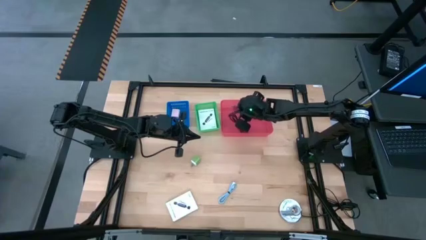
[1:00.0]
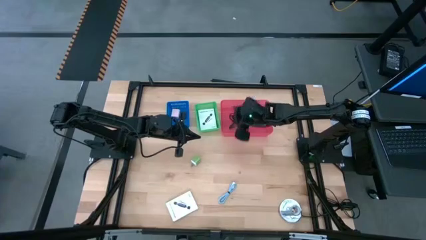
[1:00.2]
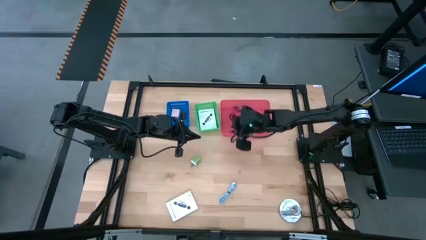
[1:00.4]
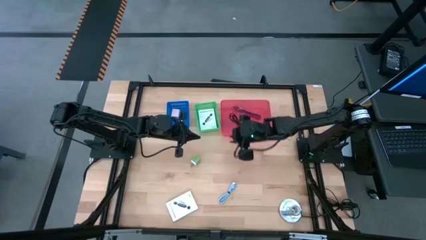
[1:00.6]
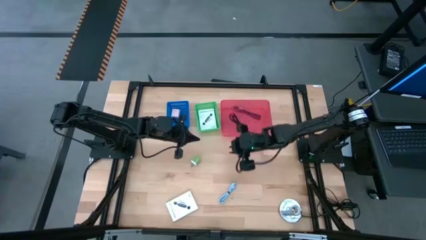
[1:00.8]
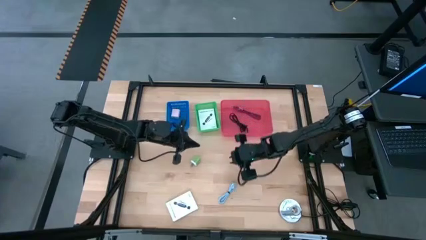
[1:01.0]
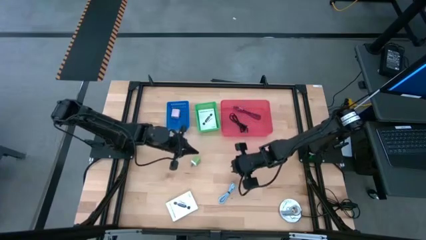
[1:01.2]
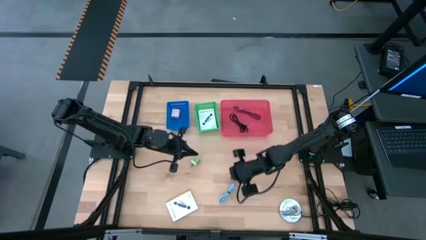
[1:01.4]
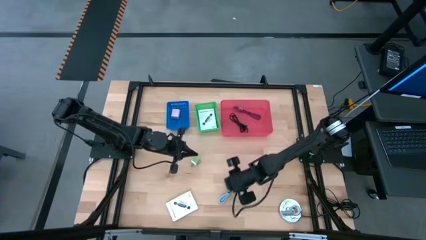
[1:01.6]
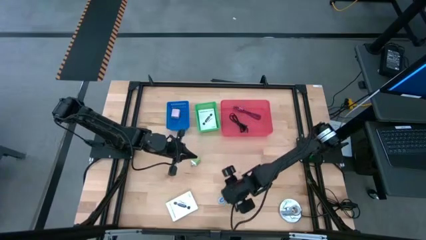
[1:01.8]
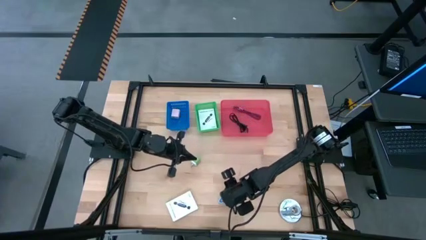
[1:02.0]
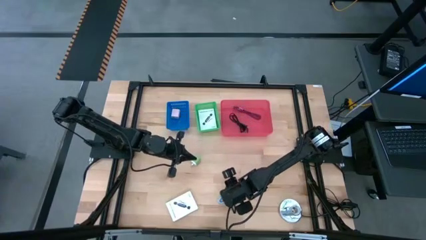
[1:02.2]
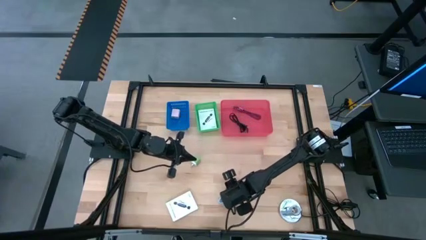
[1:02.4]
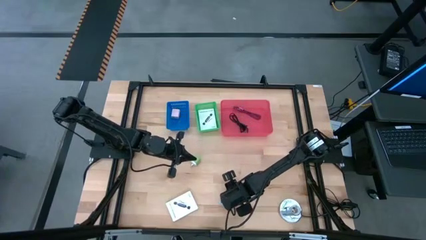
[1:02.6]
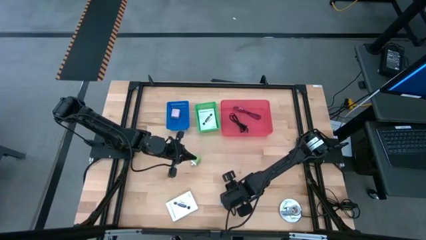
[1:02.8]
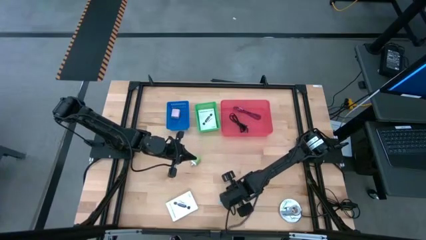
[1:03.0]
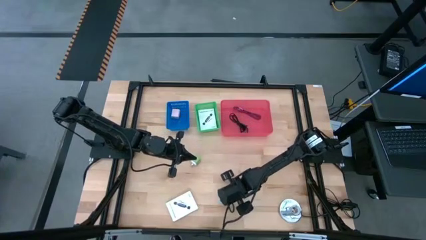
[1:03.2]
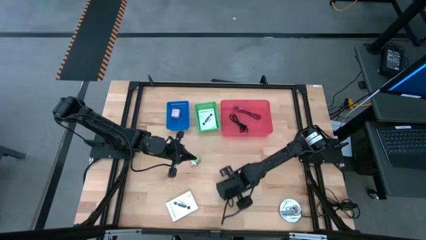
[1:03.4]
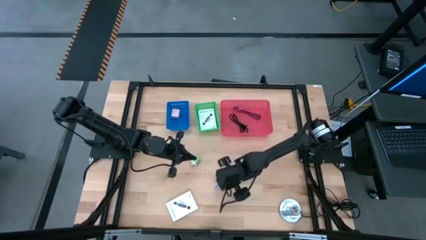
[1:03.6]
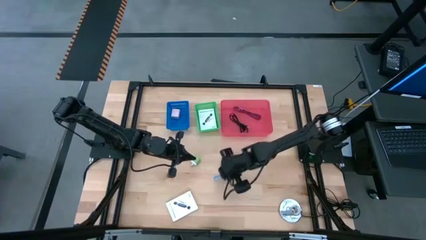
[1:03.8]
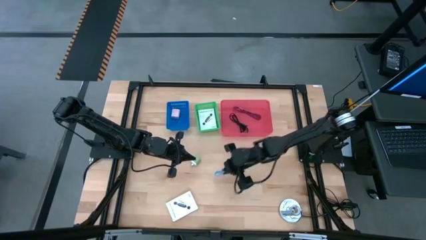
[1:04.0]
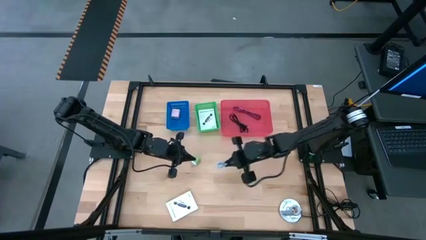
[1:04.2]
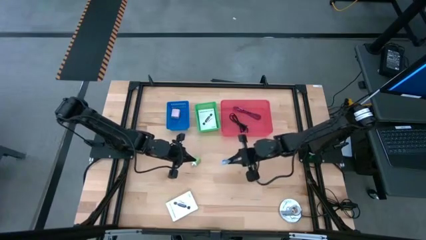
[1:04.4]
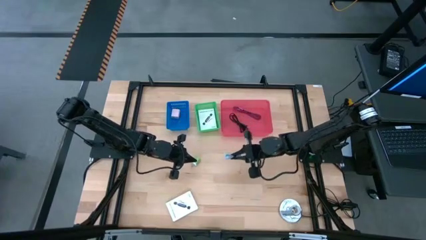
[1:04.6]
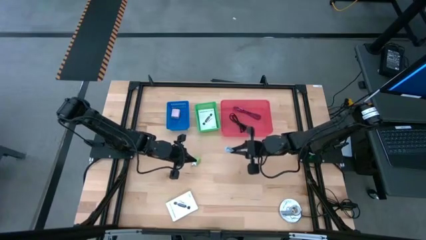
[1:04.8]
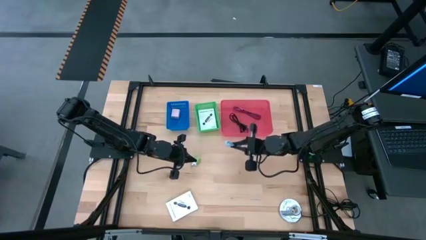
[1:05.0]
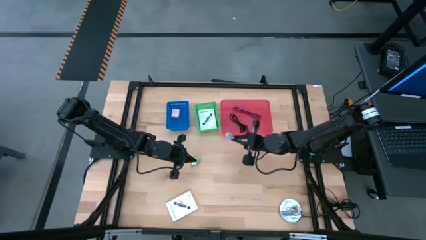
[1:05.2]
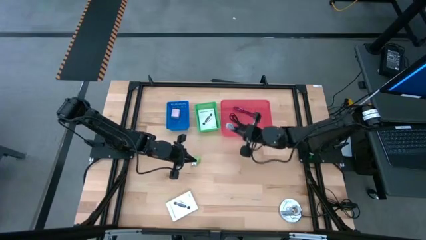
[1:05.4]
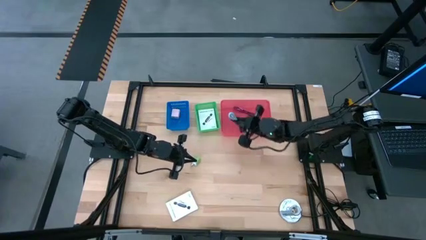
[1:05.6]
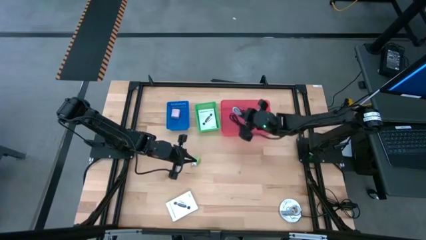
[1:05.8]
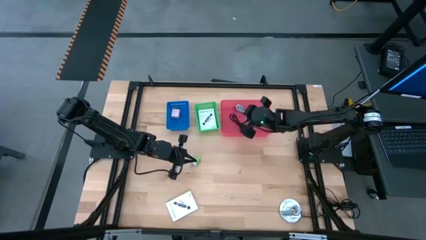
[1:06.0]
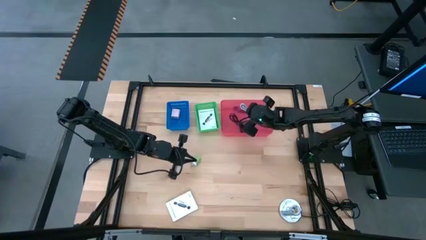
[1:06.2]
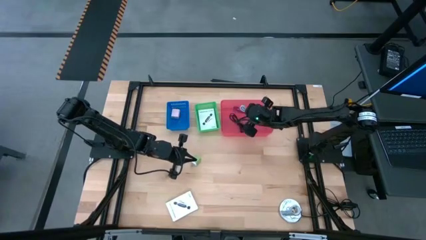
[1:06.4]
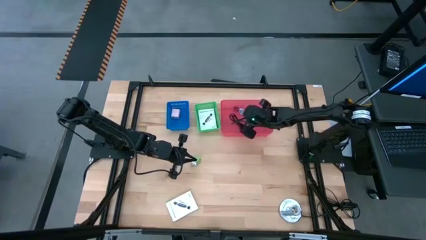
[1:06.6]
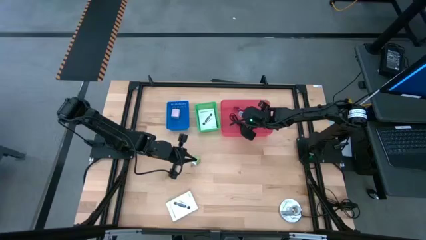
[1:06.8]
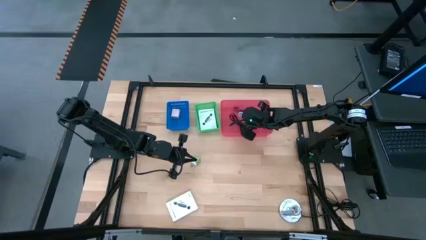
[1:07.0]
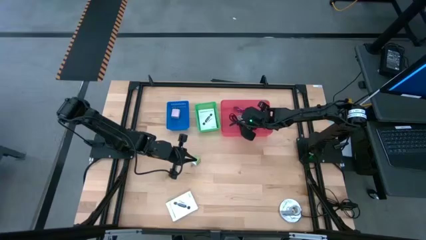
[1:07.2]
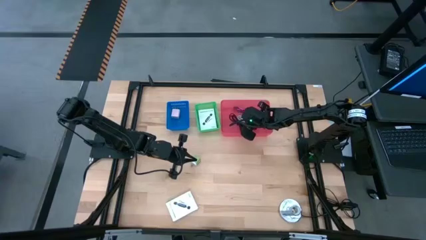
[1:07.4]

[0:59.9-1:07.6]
Task: Pick and place items into bin
Put the blue charger cable into the red bin

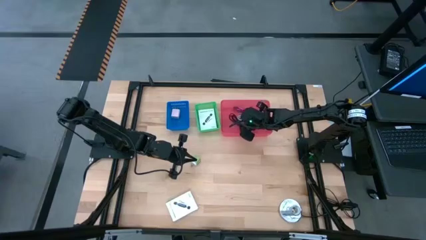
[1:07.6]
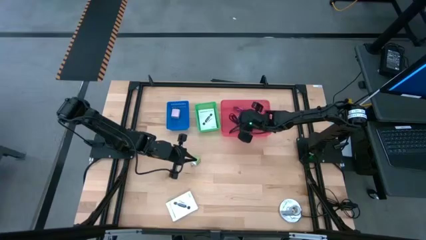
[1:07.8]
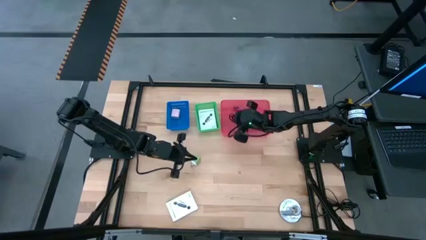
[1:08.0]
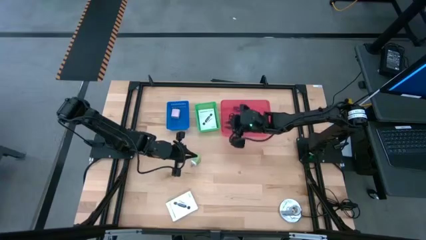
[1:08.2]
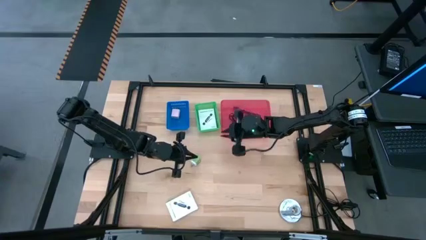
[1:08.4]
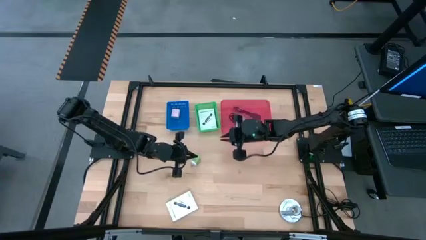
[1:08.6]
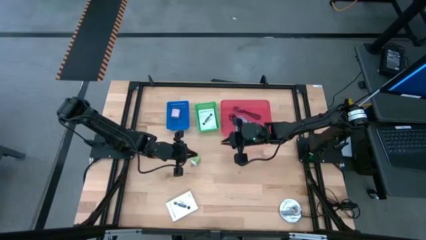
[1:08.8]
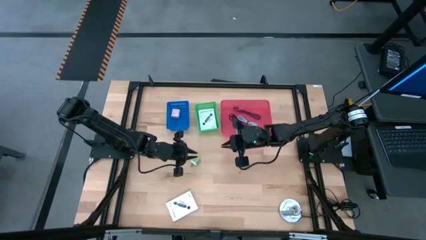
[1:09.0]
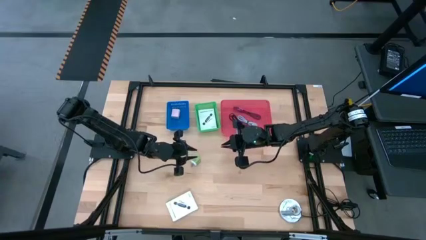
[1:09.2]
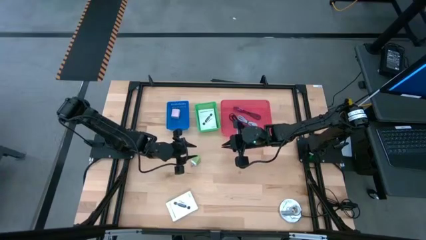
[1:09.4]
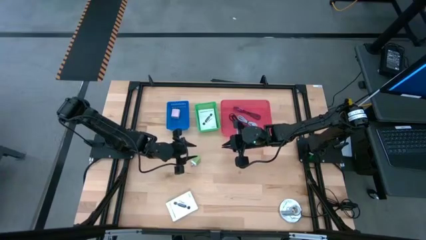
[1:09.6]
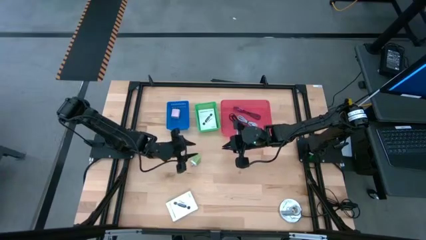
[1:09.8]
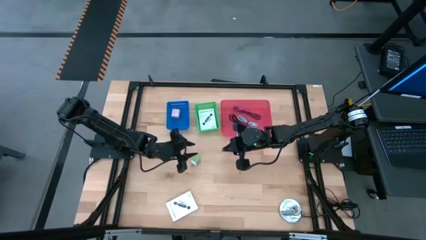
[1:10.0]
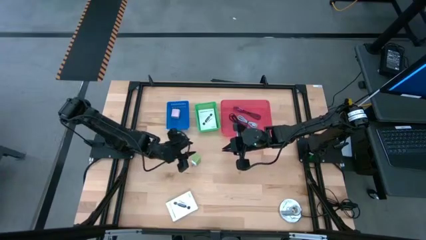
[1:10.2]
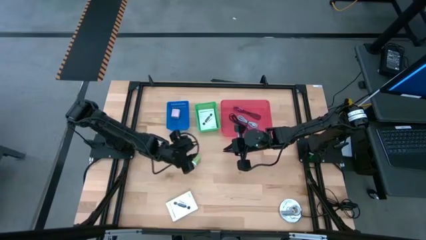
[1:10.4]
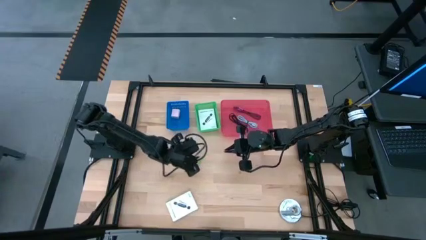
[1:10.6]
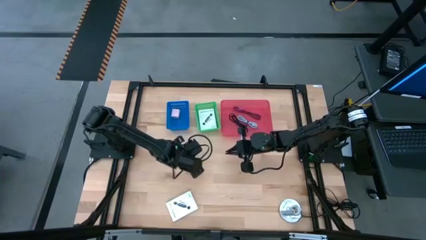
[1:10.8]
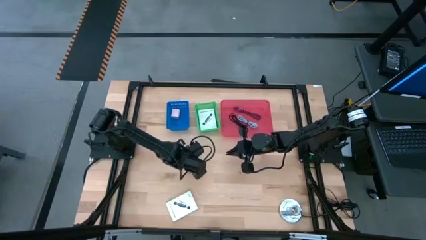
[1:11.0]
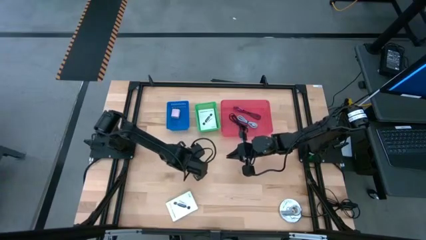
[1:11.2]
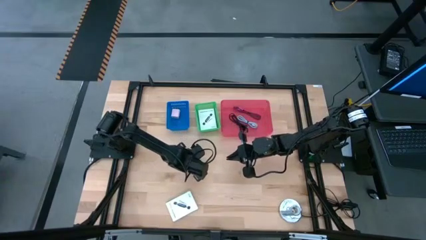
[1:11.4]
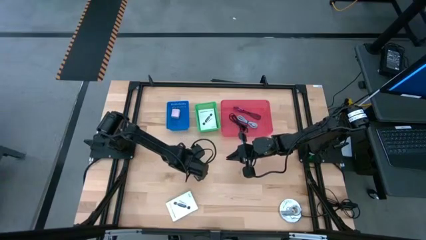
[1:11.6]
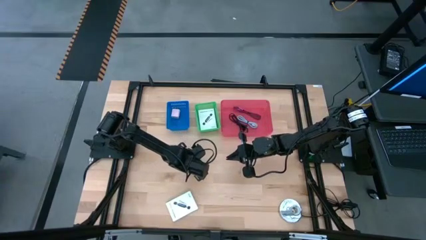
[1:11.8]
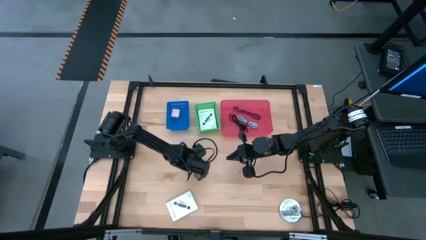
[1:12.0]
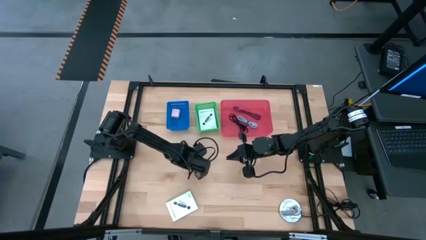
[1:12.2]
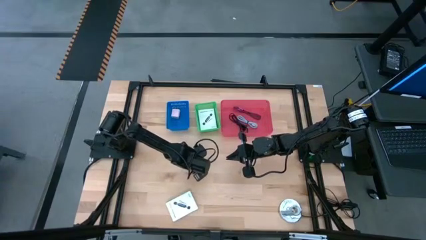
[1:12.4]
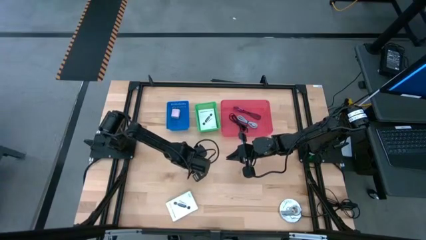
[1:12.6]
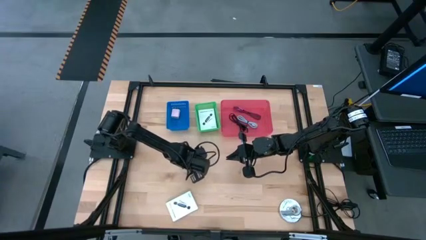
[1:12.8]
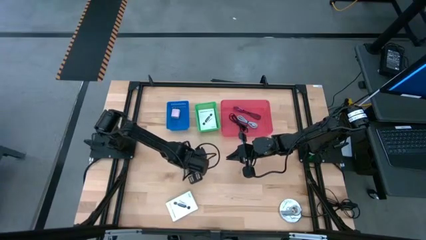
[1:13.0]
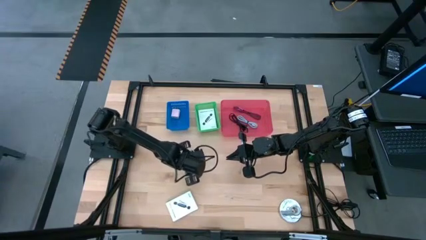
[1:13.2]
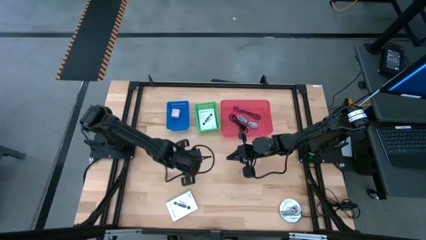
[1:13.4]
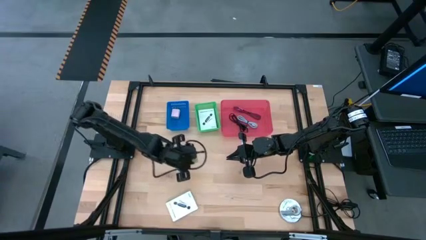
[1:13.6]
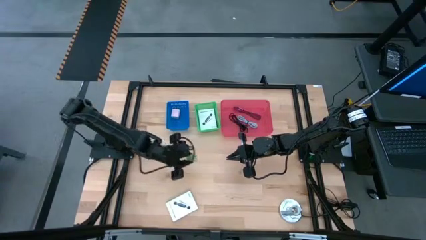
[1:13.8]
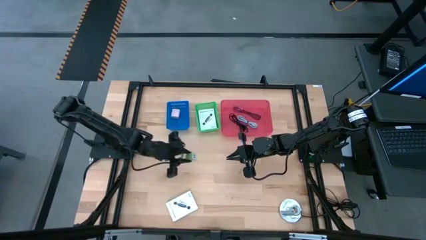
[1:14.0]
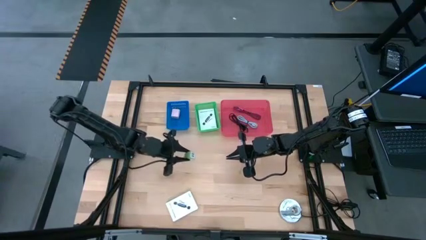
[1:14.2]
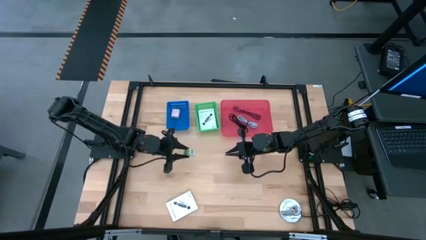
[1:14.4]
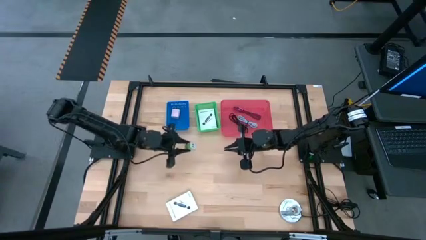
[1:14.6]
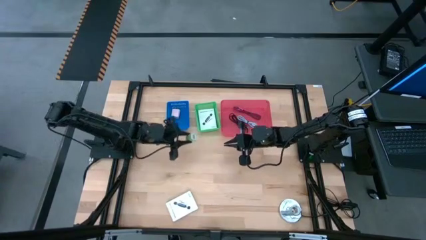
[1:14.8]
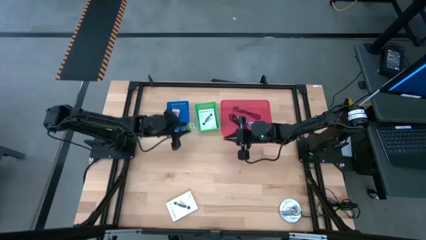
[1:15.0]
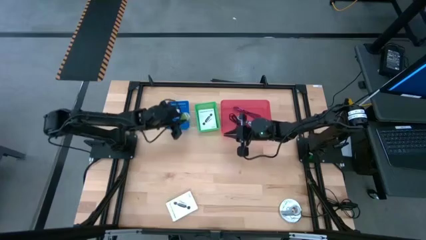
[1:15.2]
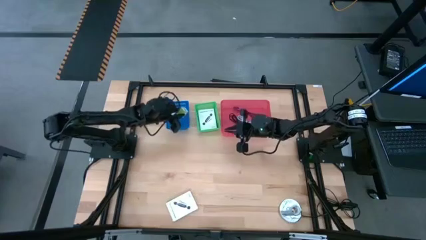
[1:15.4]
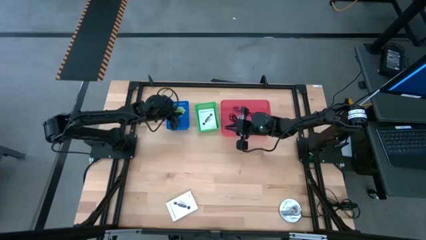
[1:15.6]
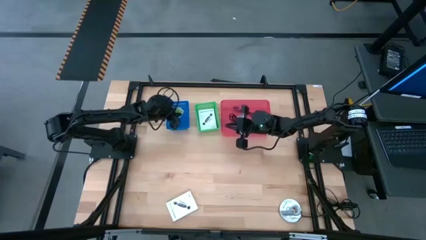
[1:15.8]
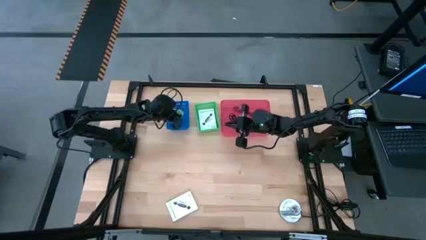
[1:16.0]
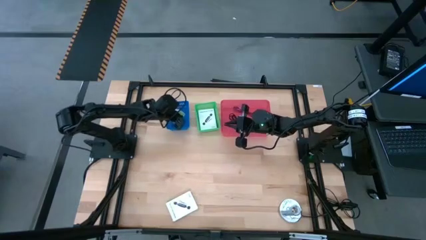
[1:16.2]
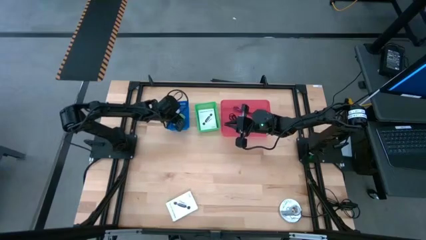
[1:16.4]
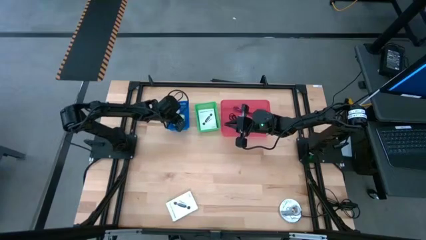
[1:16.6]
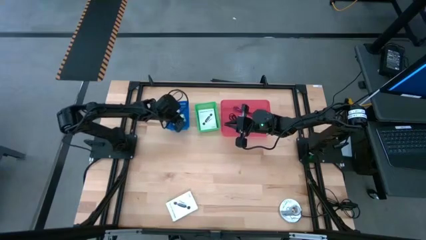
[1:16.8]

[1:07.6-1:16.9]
Put the green charger adapter into the blue bin

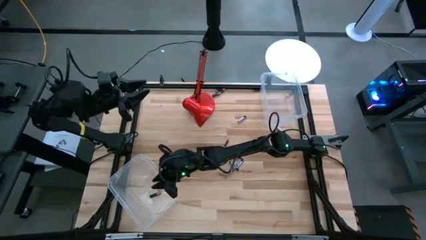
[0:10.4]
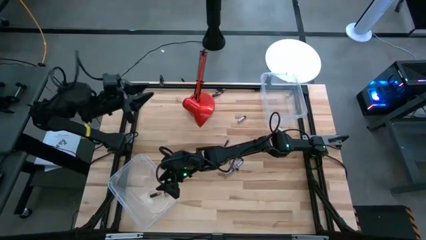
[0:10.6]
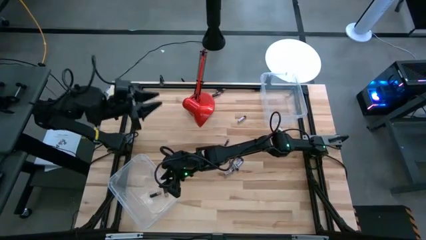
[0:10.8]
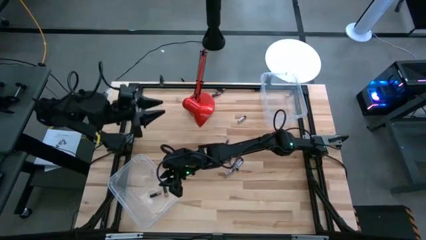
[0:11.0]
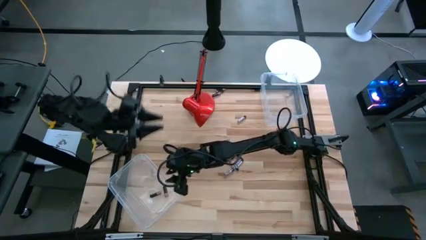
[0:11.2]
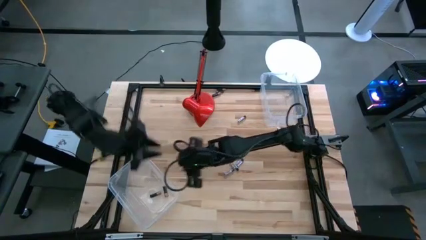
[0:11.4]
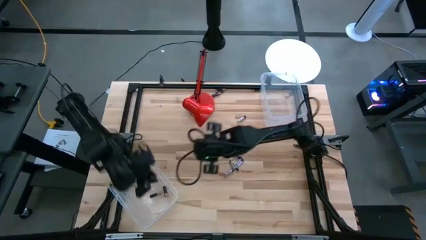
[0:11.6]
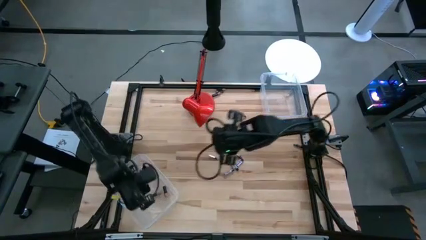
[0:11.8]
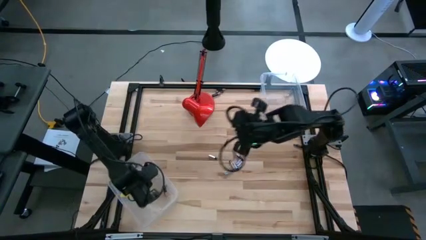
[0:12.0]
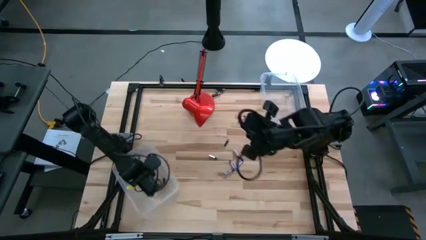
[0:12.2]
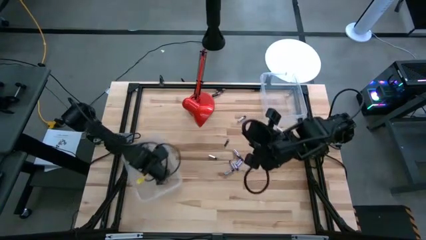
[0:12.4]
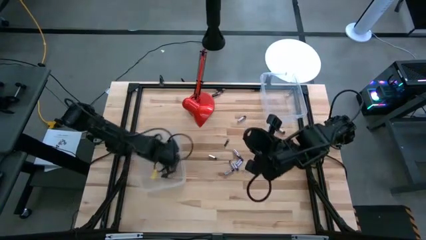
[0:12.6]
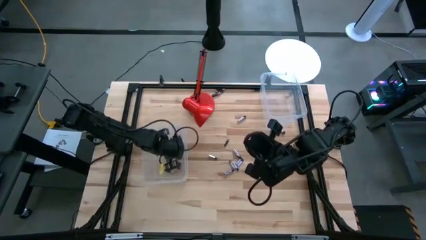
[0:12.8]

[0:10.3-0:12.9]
Task: Sort batteries
Move the bottom transparent bin to the middle left of the table
